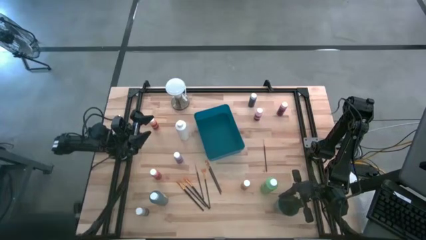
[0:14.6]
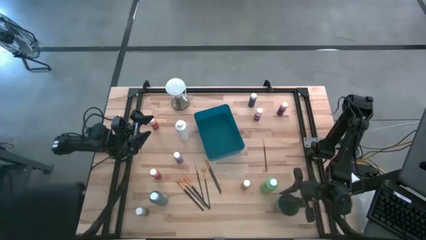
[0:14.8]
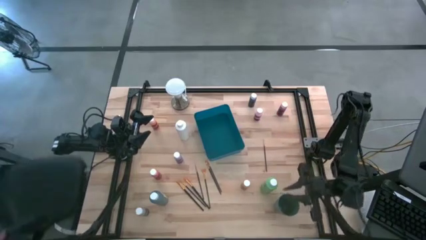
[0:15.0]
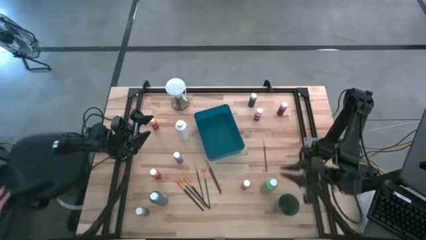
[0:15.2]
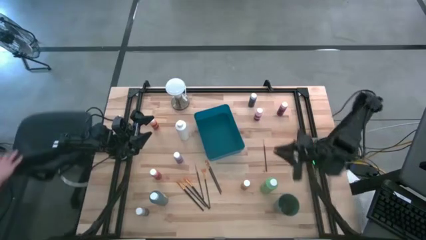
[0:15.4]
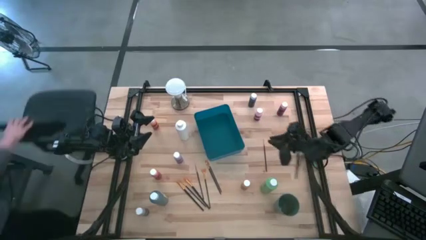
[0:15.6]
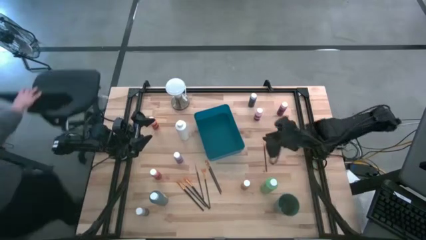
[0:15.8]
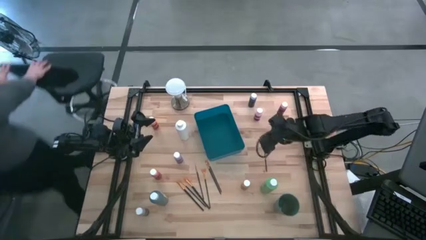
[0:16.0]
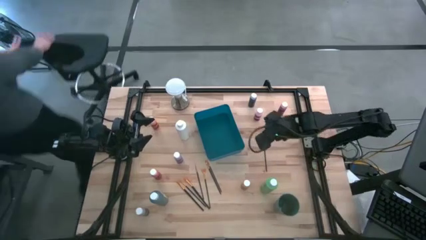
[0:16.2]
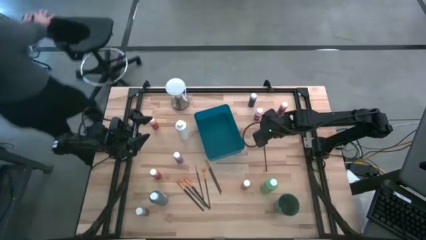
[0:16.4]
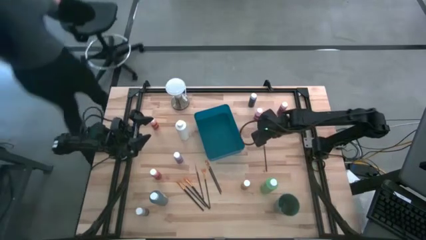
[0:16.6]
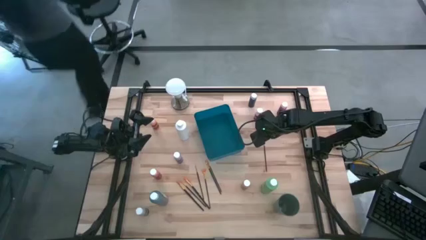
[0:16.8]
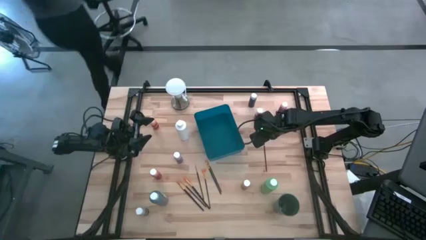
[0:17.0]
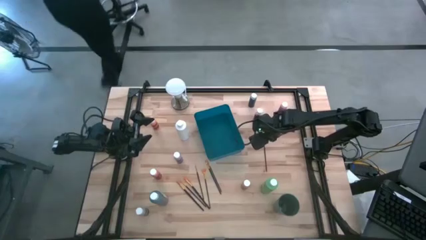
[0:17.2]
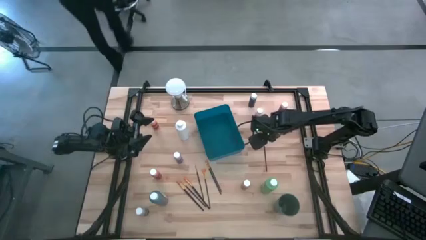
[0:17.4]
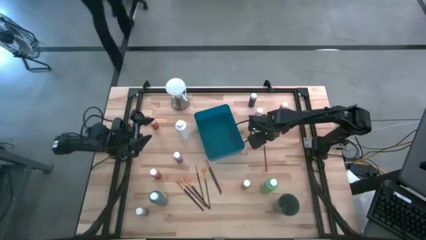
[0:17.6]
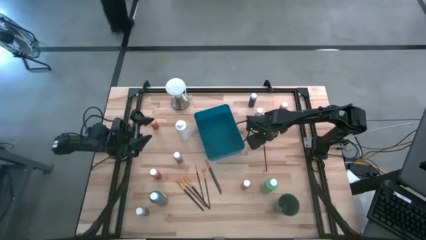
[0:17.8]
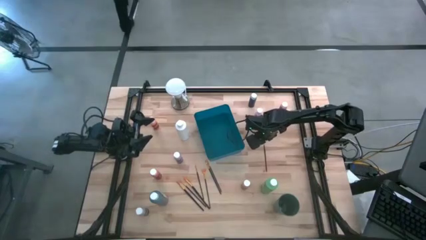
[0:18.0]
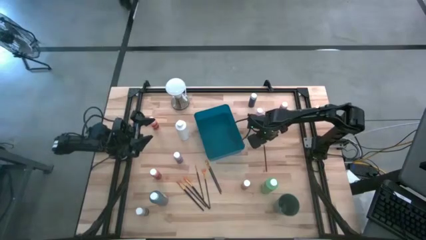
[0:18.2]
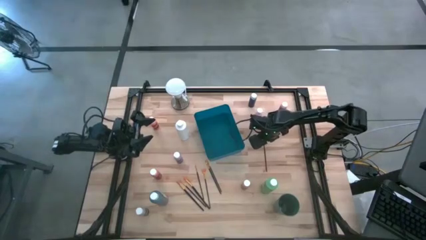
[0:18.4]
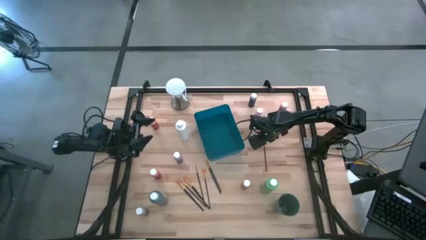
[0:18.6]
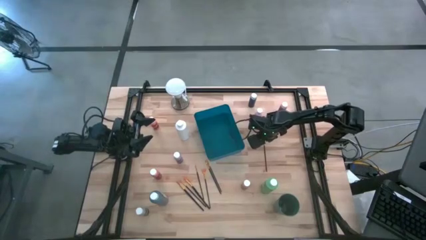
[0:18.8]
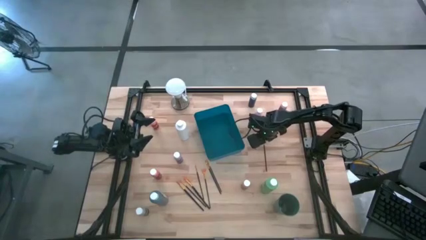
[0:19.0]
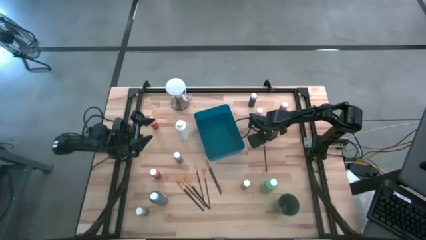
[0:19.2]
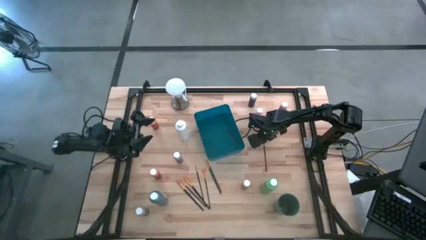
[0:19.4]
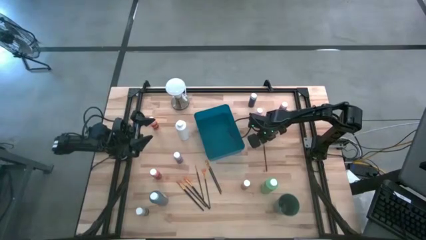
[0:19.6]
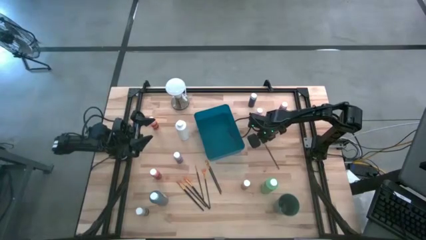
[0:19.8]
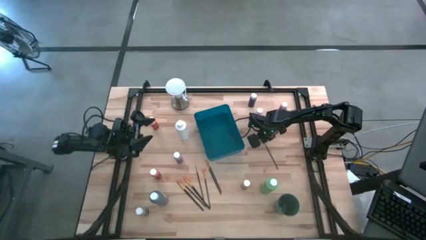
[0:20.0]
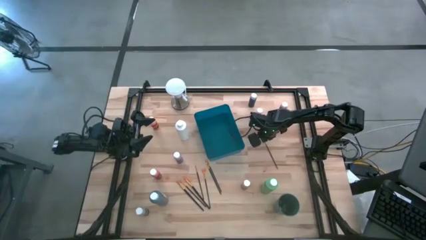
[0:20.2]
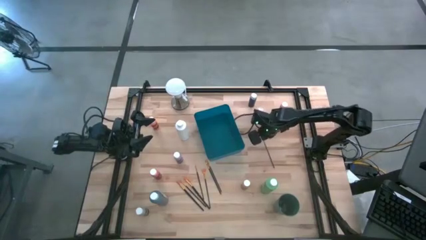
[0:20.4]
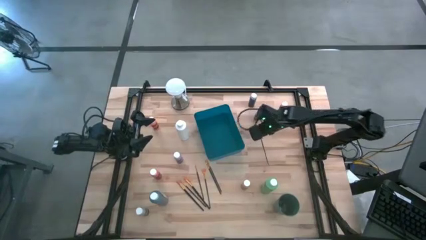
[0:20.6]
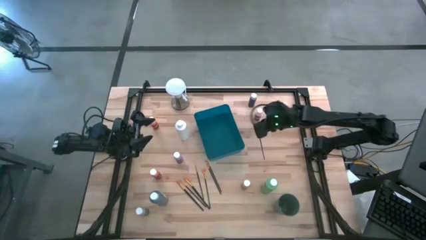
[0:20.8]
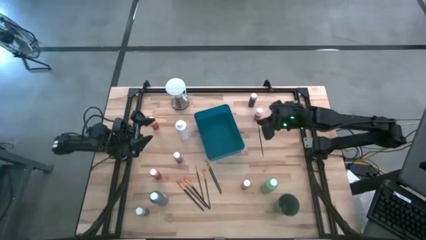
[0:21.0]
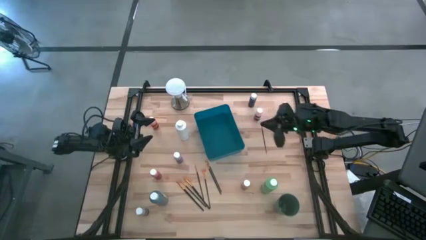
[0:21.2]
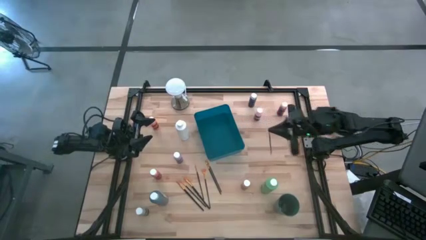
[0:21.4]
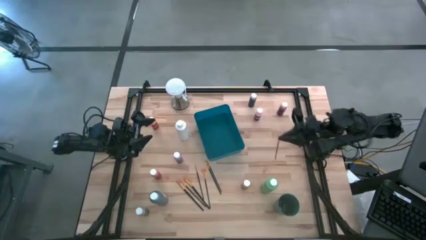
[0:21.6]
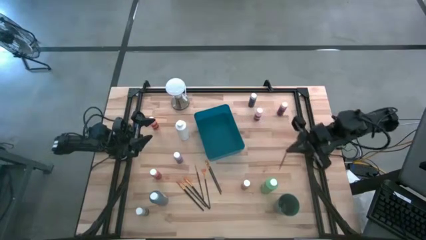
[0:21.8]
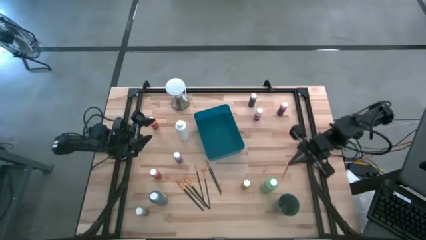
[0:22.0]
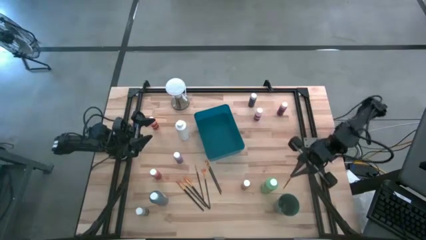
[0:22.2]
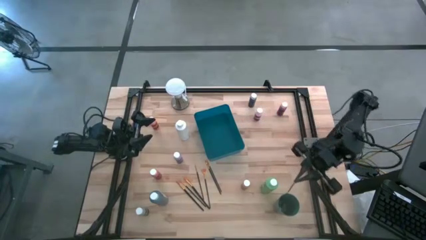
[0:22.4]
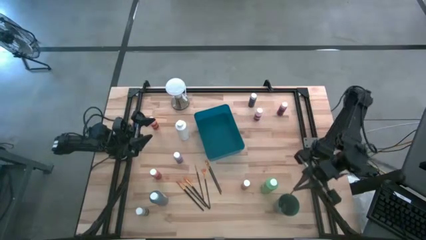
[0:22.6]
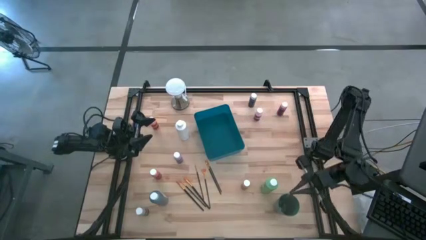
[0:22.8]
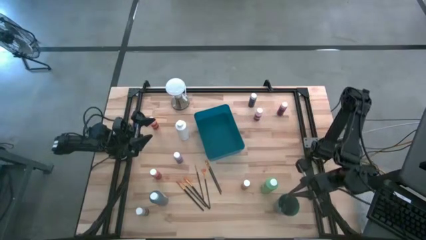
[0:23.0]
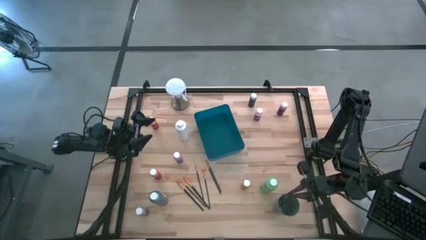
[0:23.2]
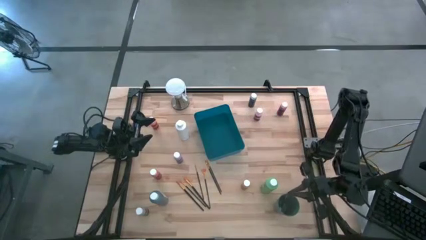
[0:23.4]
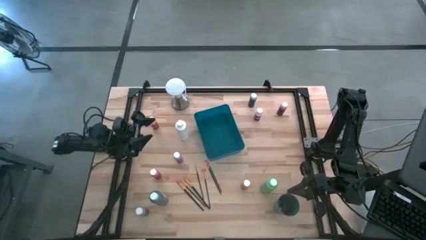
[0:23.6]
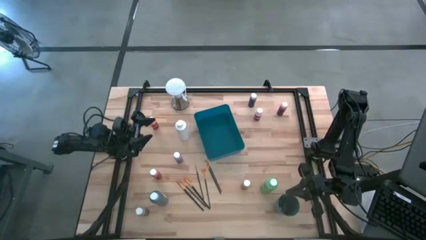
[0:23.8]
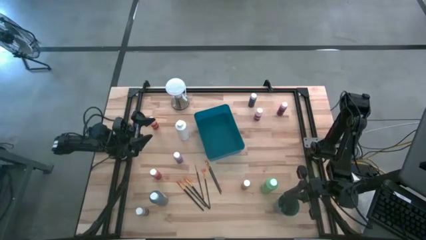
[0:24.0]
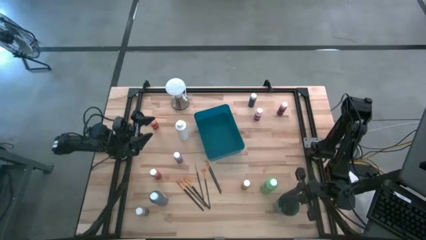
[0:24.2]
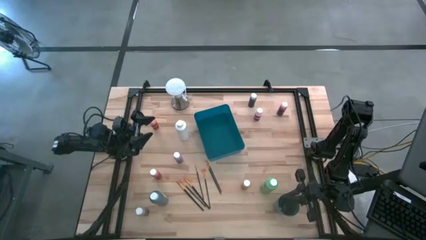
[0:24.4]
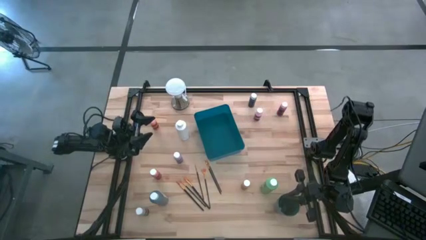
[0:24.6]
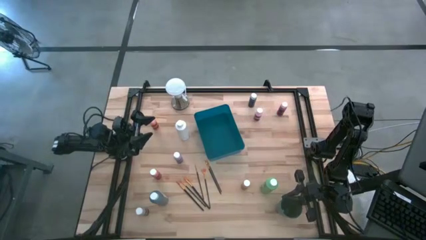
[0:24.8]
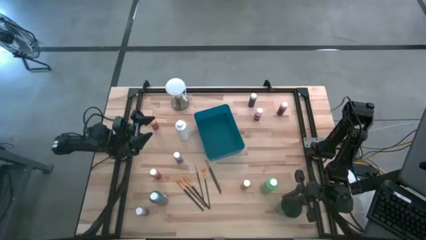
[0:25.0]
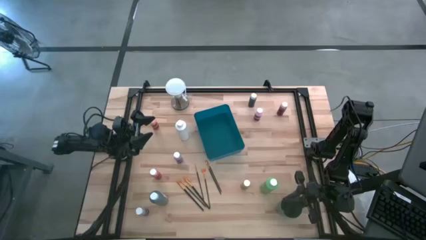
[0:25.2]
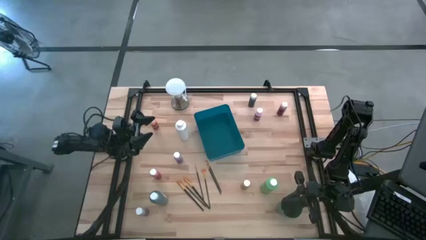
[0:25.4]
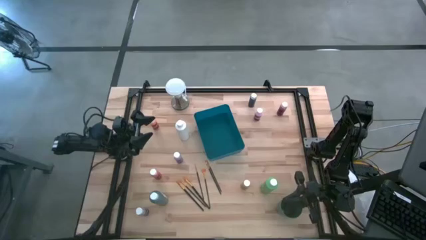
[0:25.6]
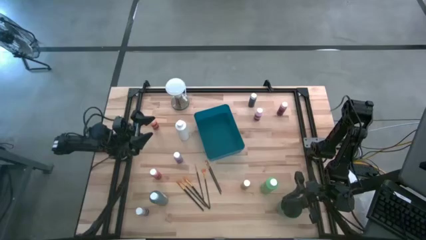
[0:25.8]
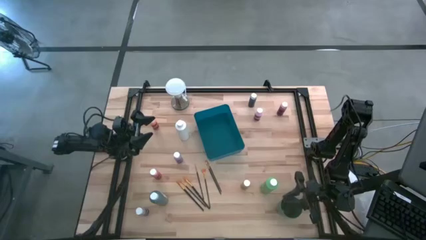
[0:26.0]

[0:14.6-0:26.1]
Task: Pick & Place Paint Supplies
Put the gold paintbrush into the green cup

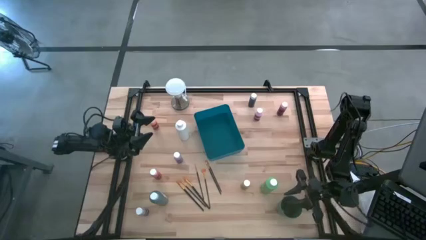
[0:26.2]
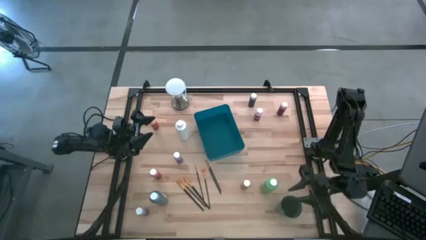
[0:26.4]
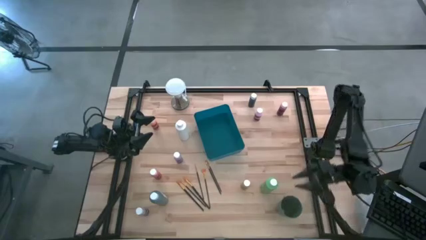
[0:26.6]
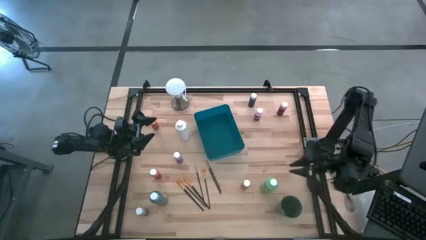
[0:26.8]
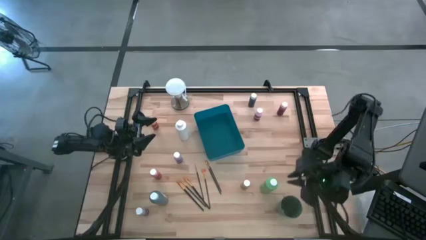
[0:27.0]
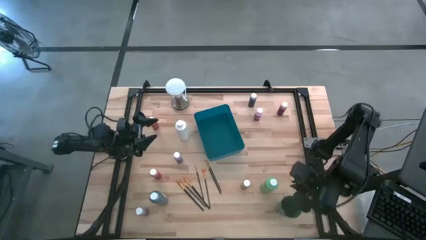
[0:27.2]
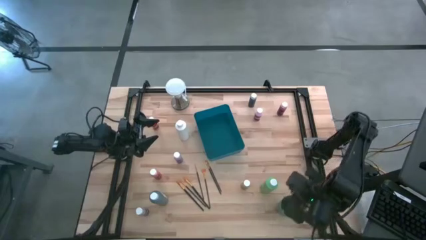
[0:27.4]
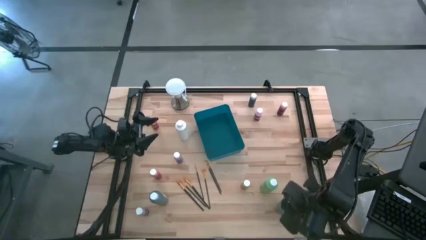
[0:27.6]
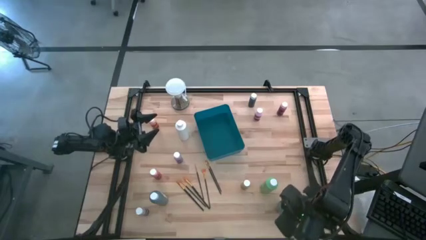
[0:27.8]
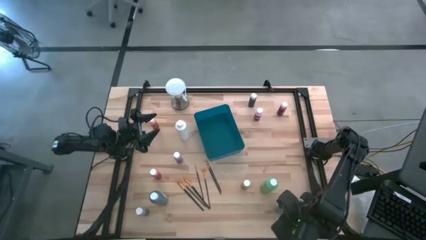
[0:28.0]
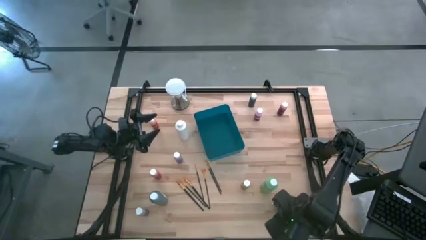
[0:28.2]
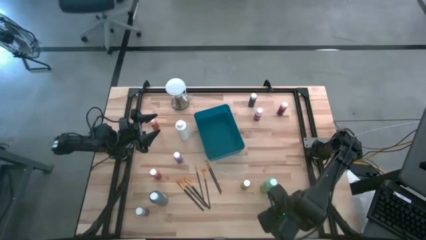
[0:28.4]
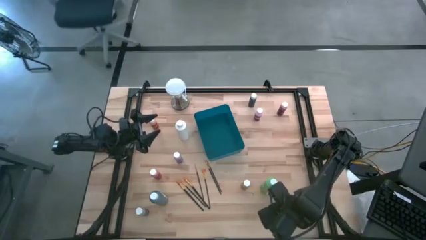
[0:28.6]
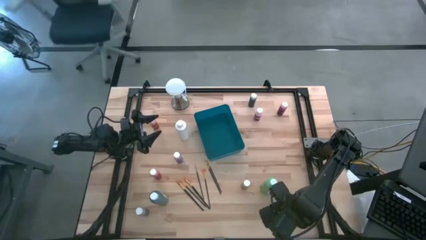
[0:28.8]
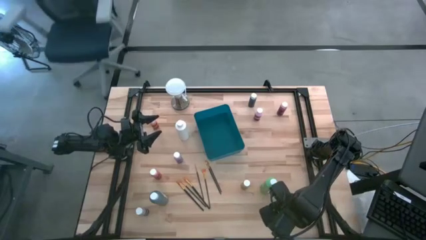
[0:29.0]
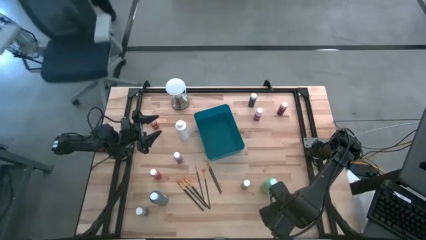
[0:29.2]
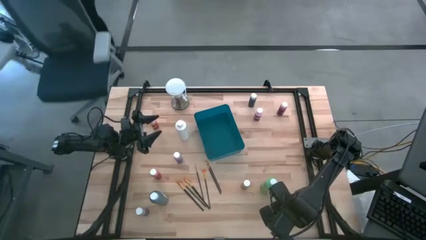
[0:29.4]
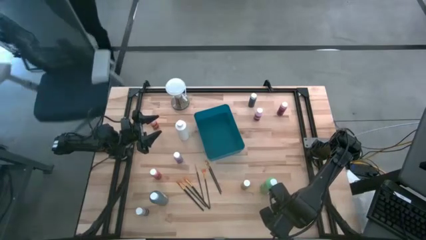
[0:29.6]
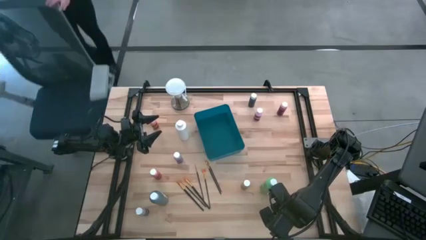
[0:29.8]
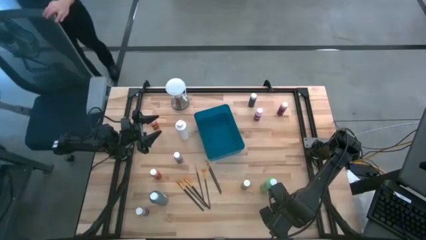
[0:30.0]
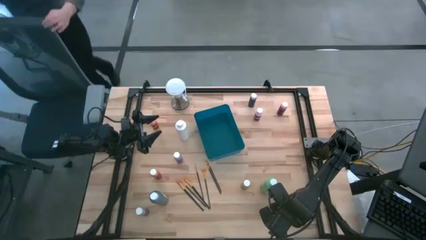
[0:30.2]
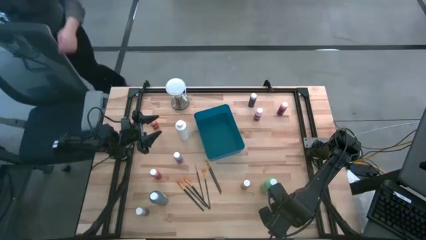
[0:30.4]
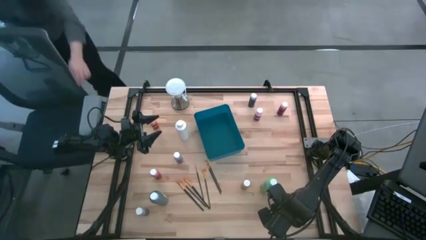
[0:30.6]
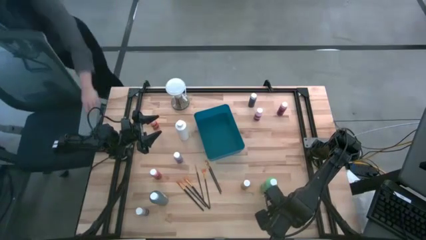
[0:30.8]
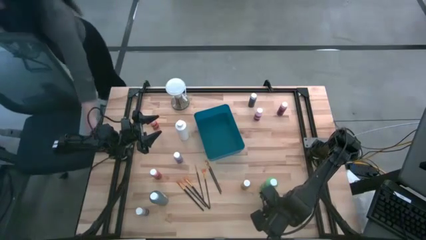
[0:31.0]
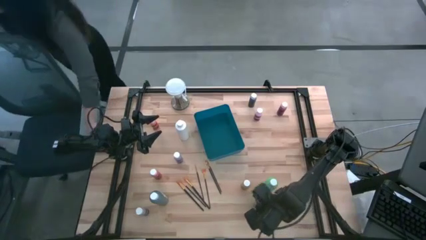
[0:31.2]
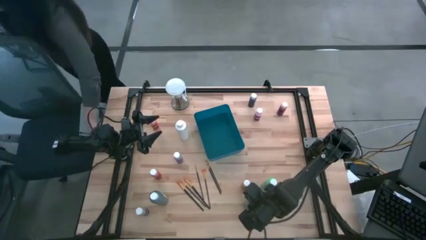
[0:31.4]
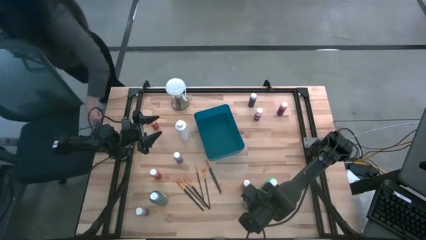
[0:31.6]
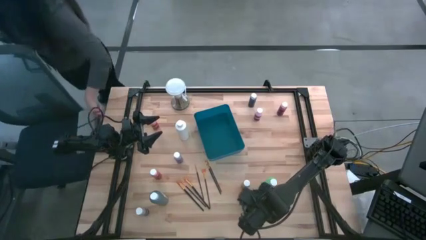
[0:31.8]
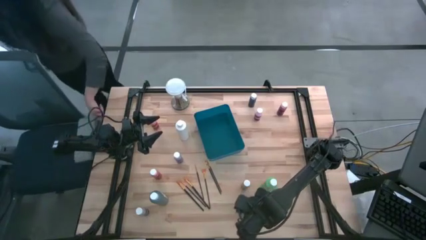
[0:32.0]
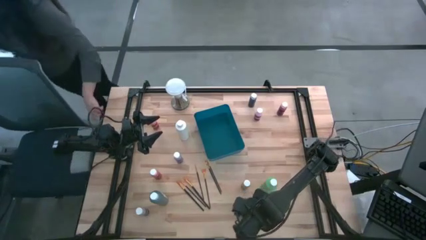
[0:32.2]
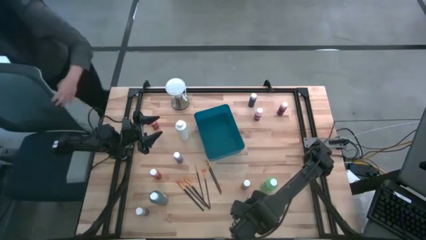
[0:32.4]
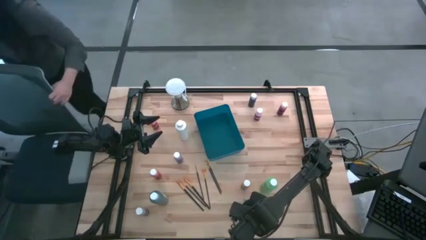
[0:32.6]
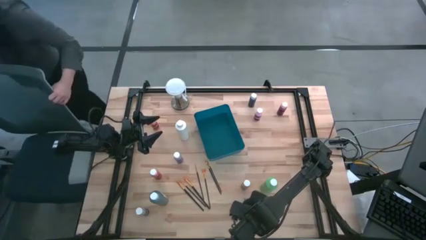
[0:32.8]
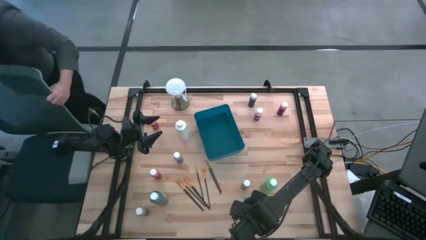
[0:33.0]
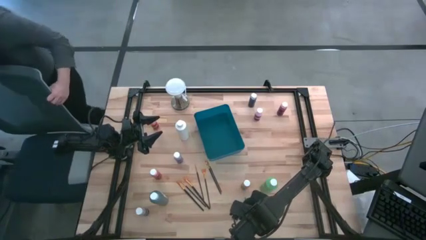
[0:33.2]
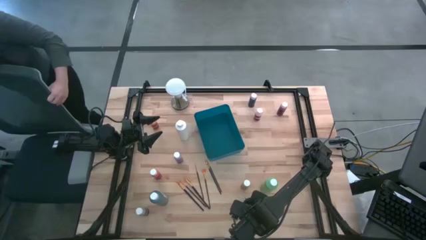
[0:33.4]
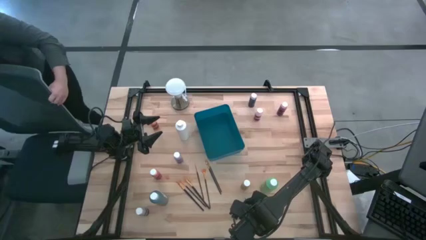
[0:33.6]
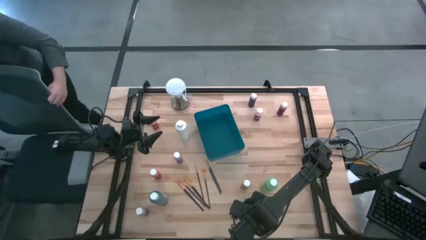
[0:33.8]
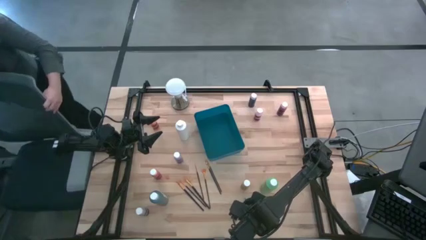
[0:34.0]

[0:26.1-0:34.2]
Move the green cup to the bottom center of the table
